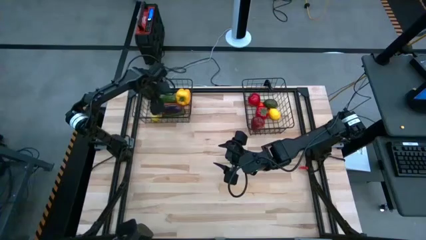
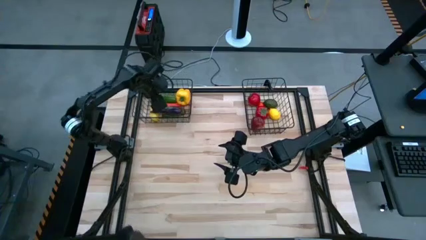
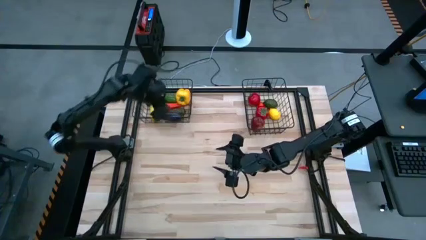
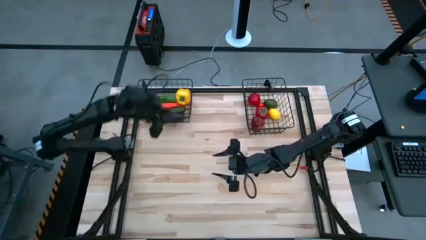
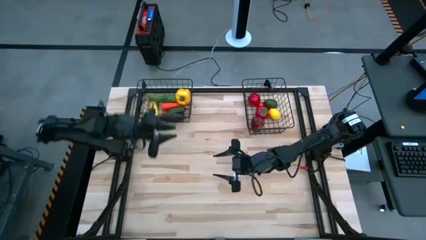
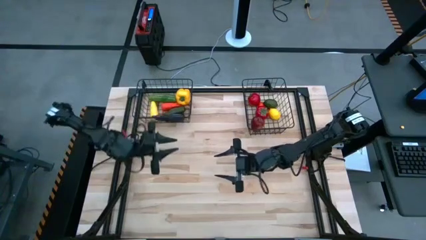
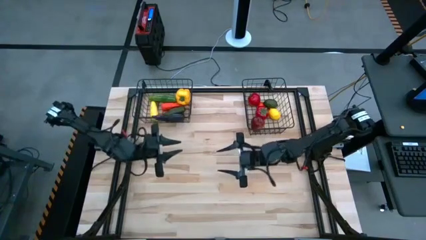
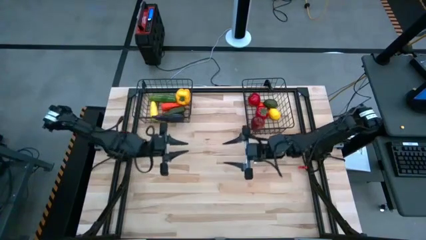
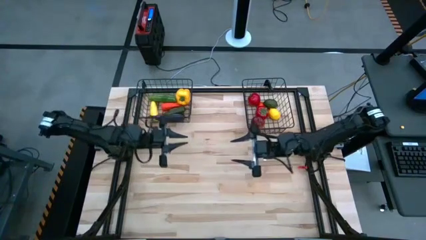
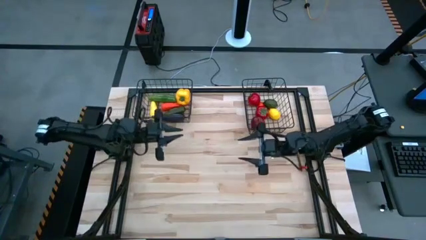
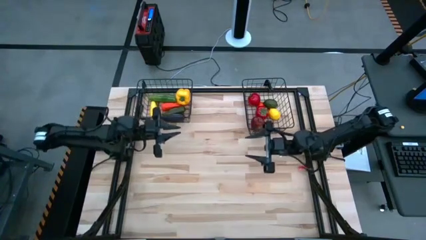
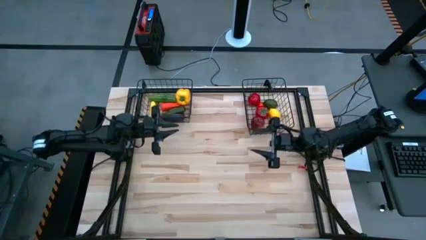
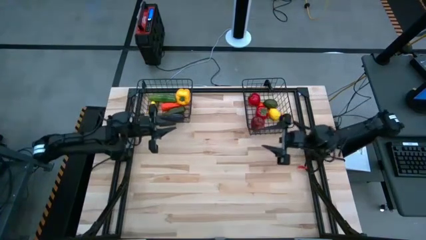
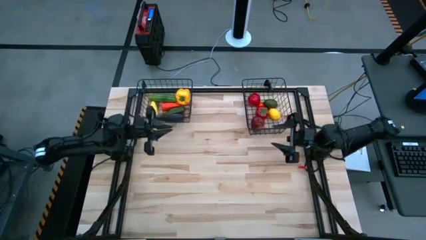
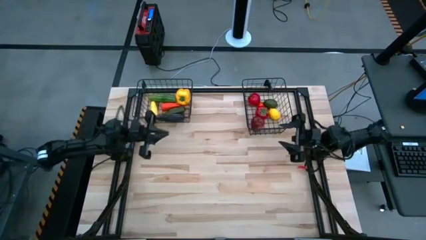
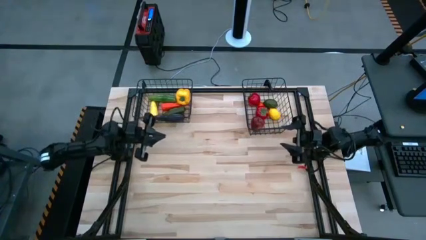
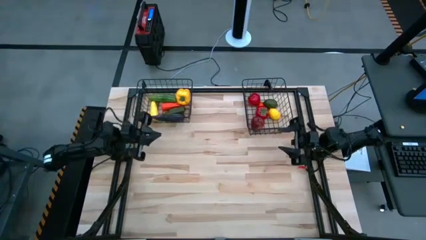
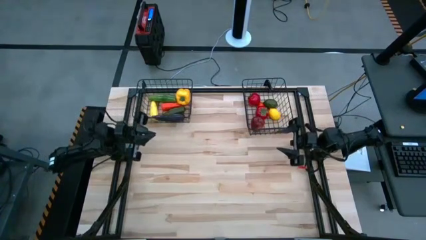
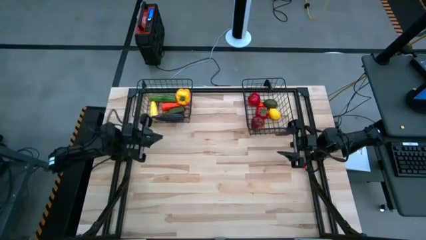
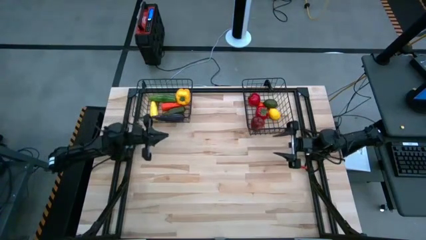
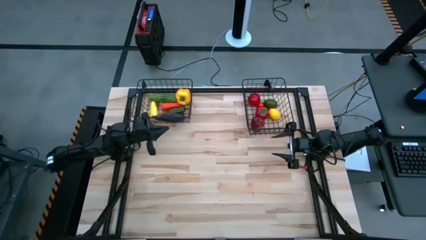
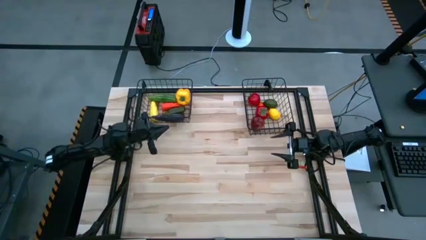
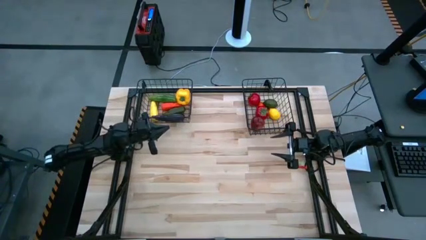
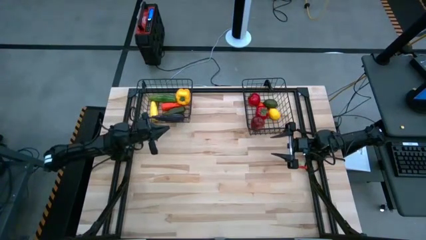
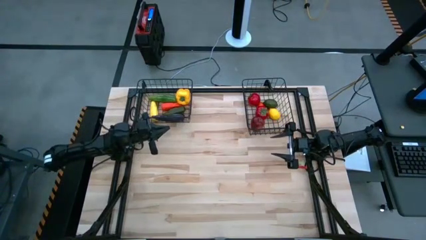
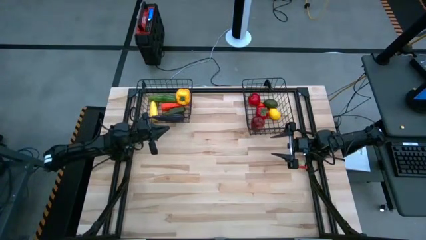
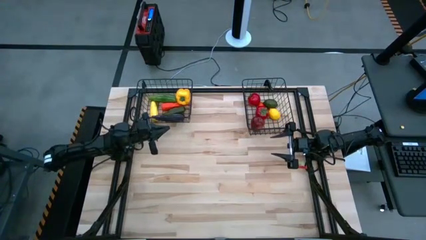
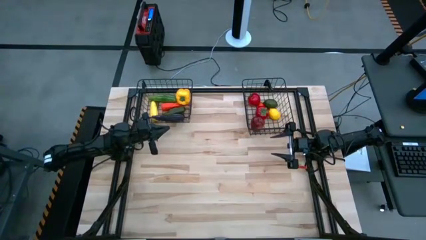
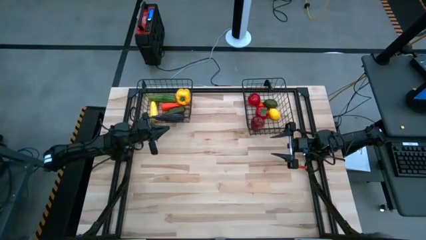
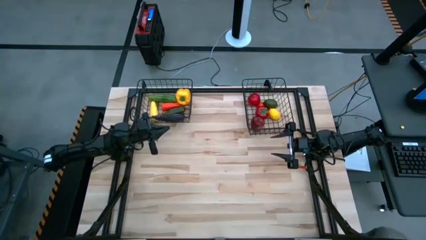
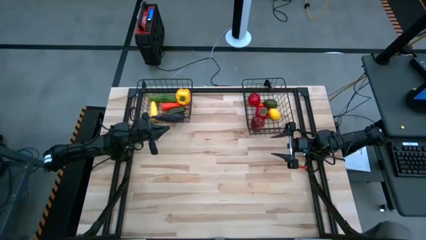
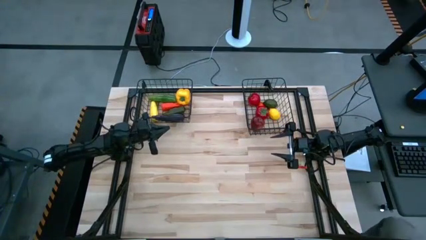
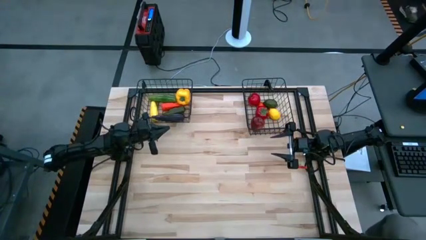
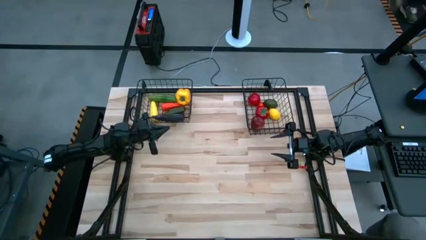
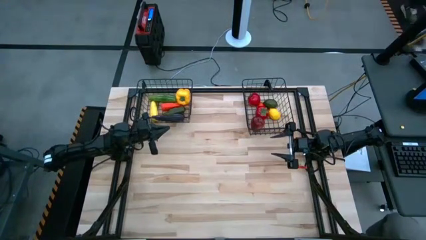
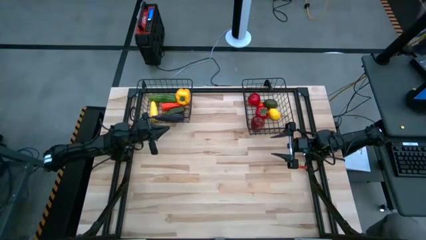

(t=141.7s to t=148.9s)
Task: Sort produce into baskets
Return to Home Position

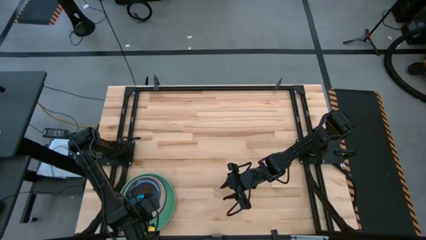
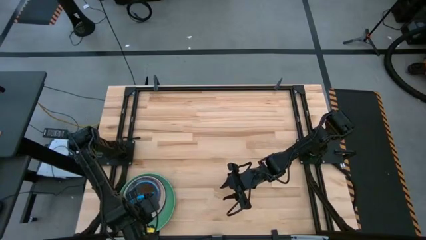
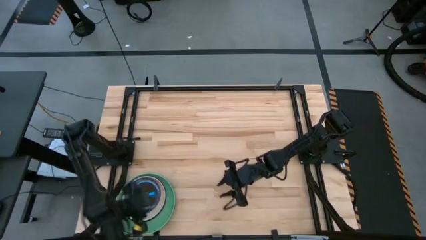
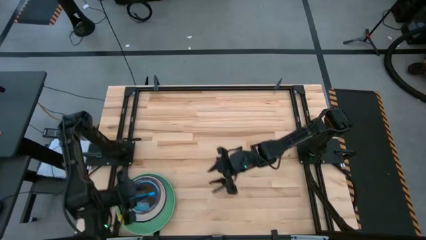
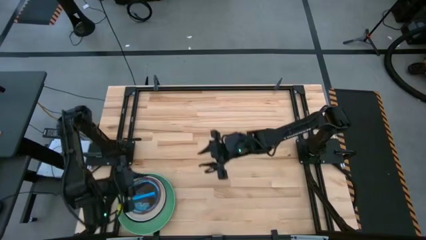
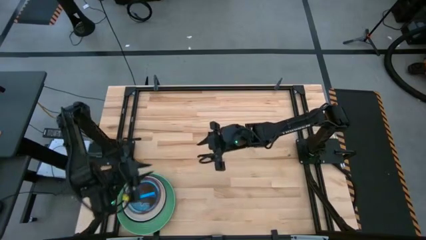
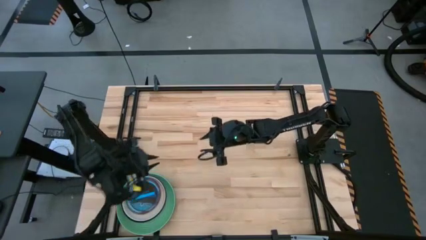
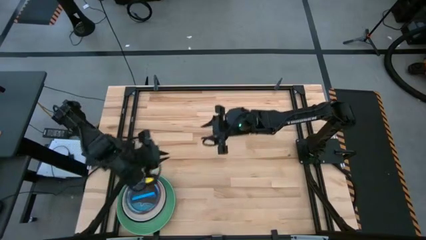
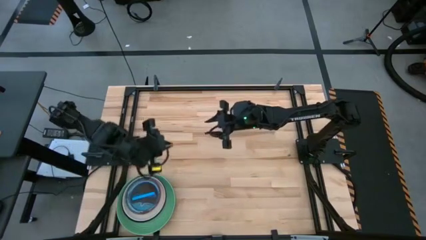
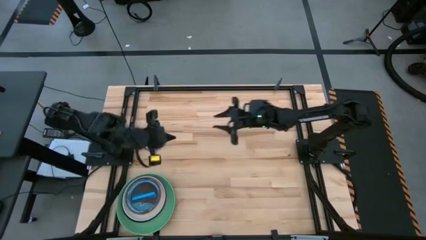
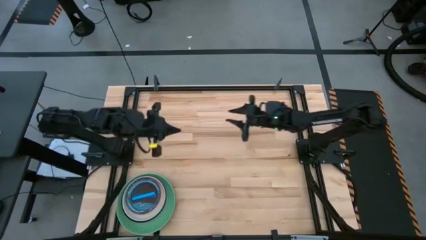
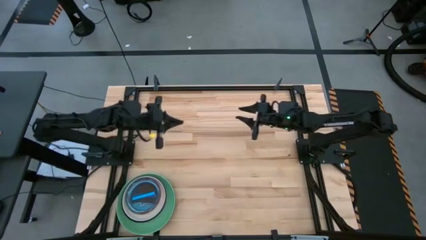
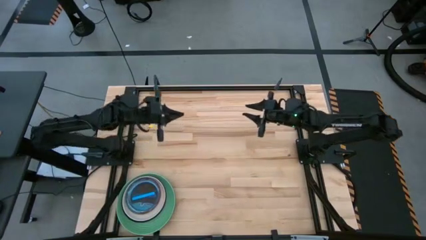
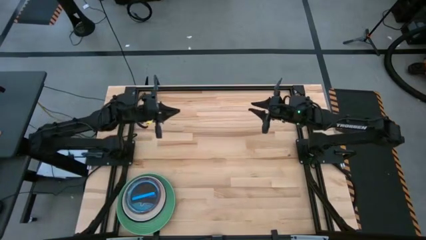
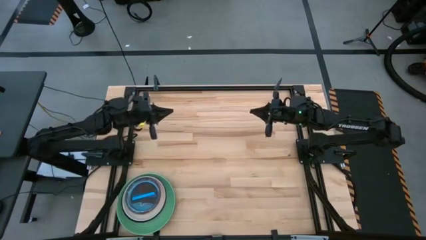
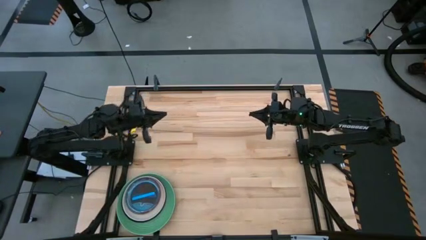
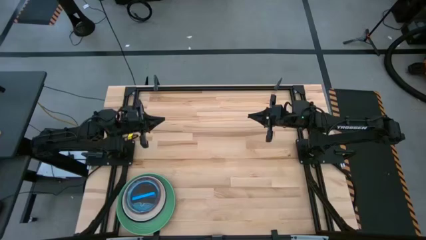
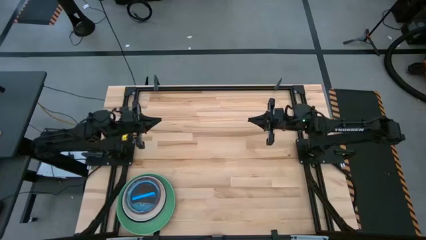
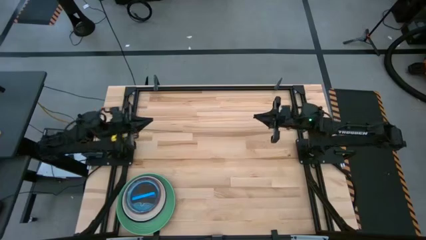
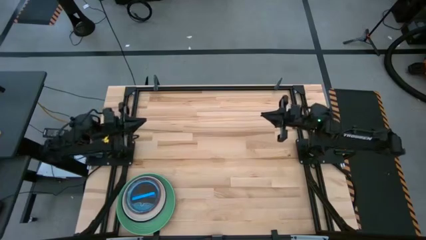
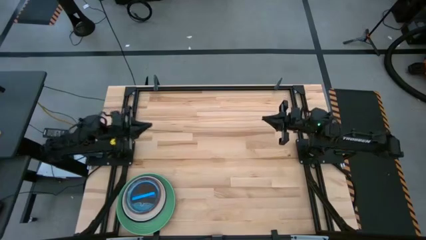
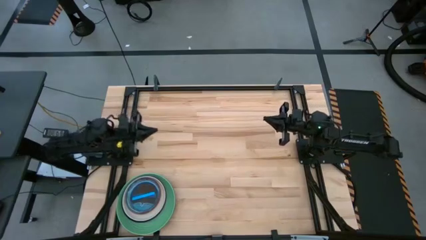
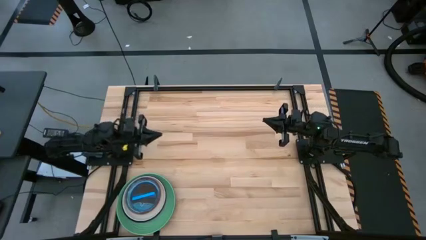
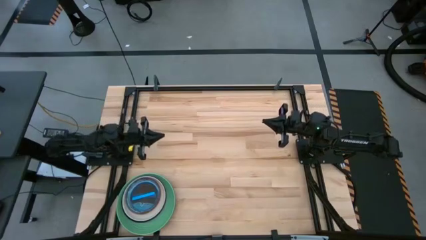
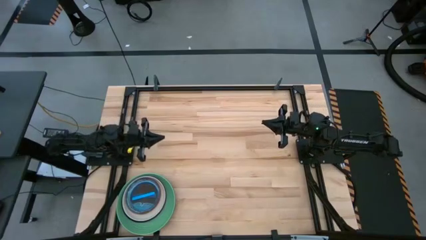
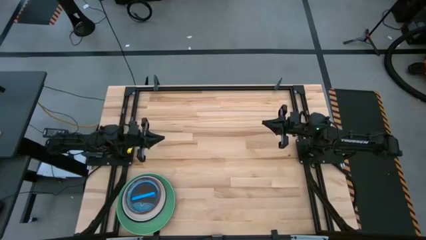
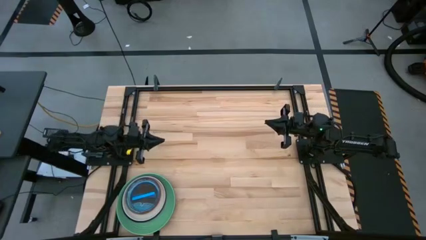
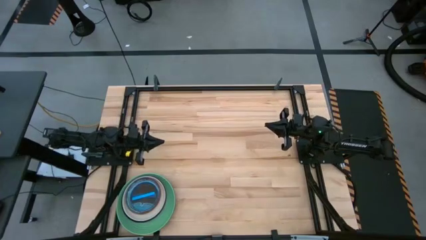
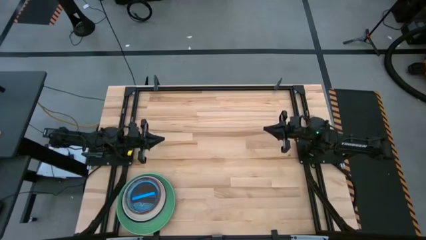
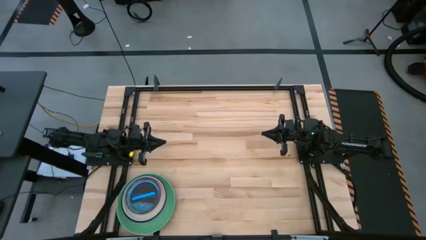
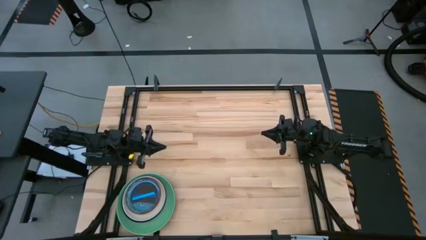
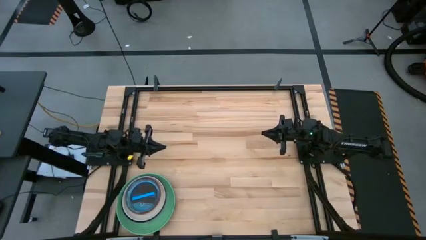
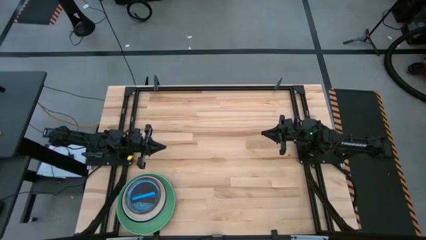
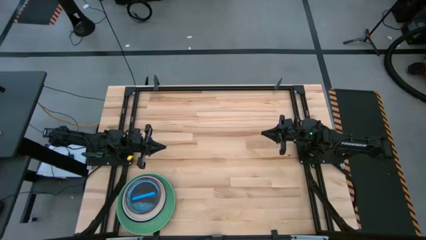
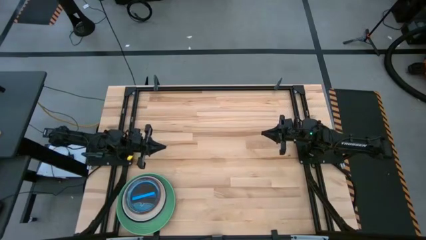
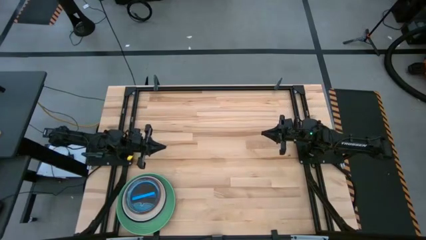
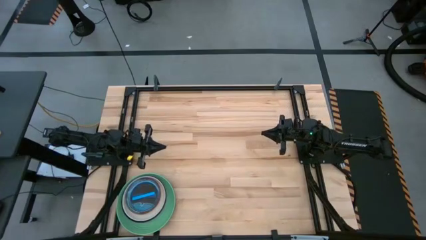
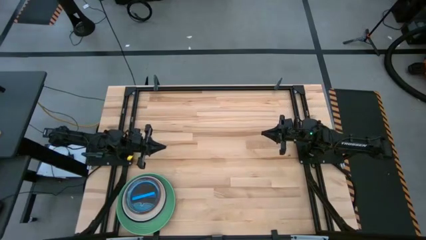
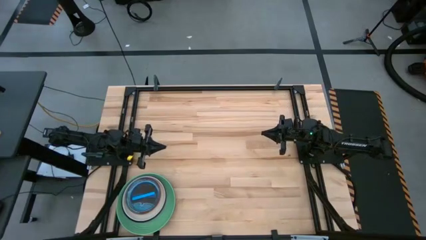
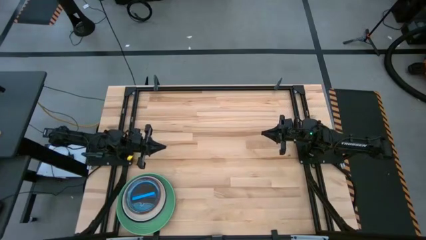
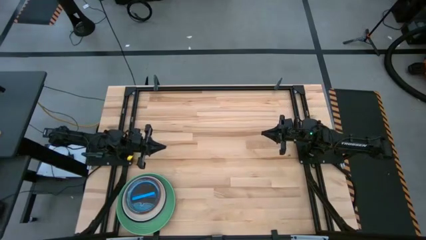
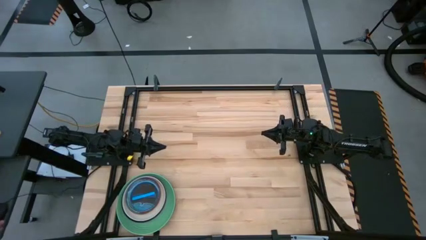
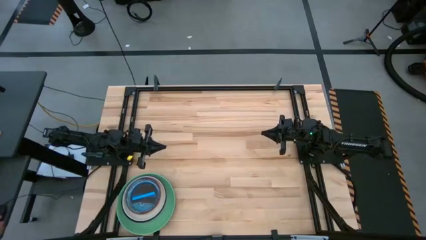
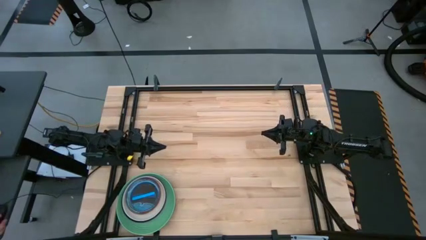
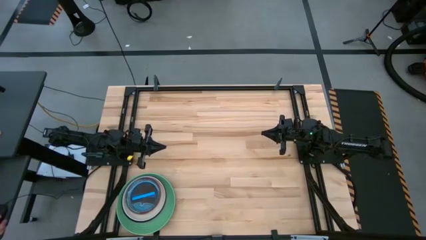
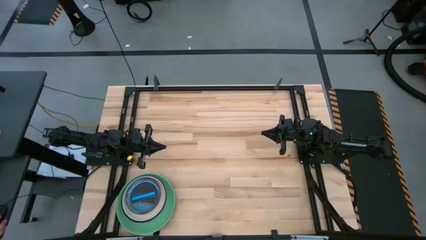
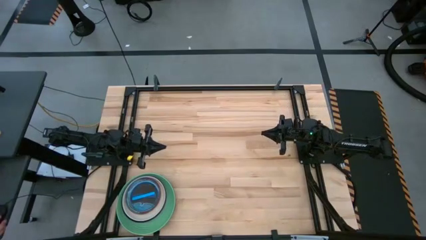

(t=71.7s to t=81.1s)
Task: Stack plastic plates
Return to Home Position
